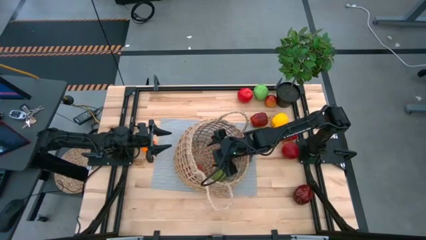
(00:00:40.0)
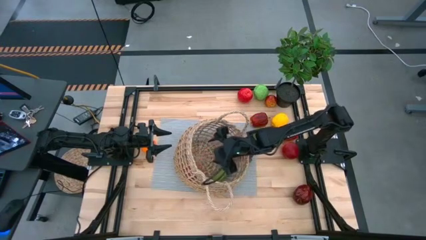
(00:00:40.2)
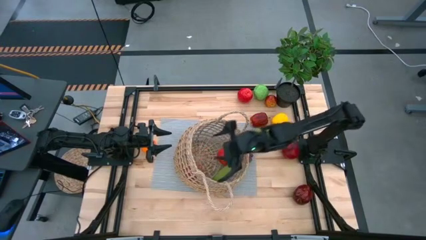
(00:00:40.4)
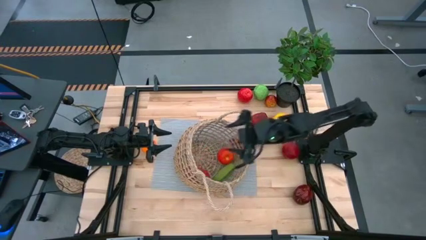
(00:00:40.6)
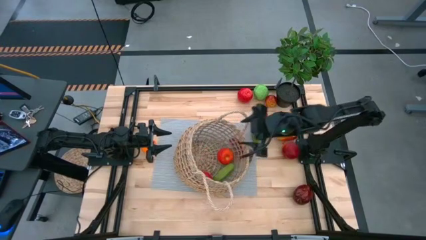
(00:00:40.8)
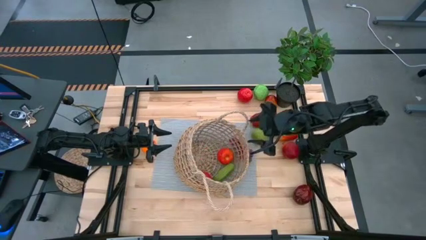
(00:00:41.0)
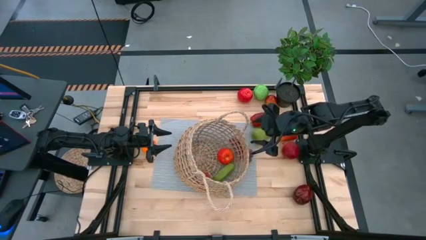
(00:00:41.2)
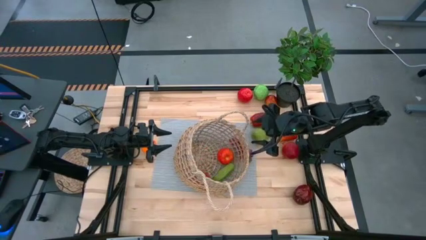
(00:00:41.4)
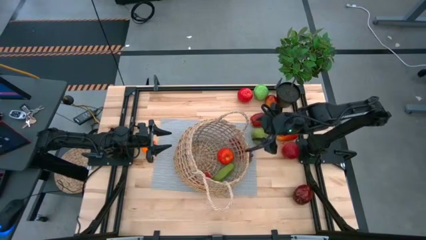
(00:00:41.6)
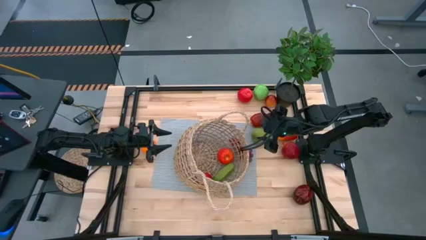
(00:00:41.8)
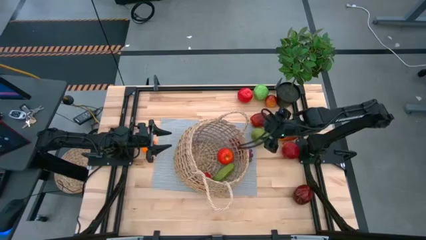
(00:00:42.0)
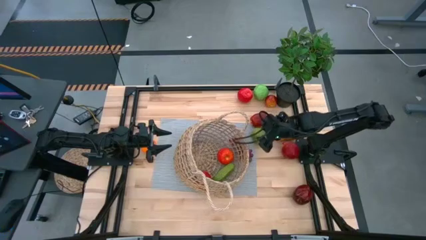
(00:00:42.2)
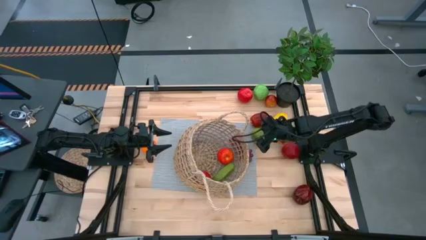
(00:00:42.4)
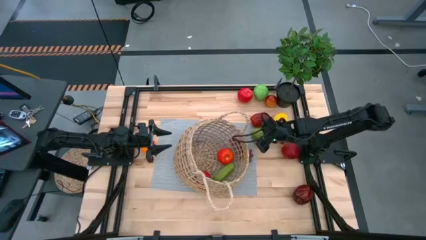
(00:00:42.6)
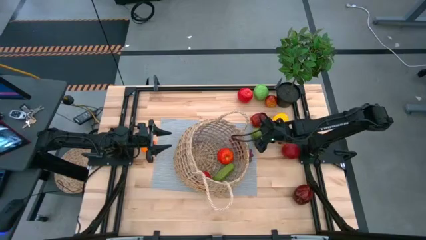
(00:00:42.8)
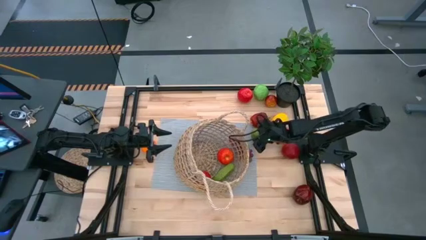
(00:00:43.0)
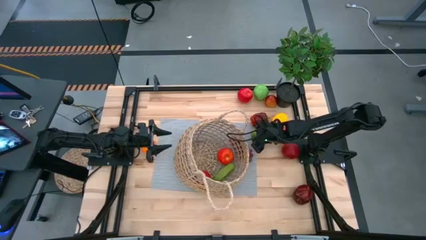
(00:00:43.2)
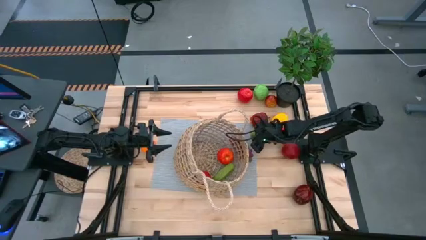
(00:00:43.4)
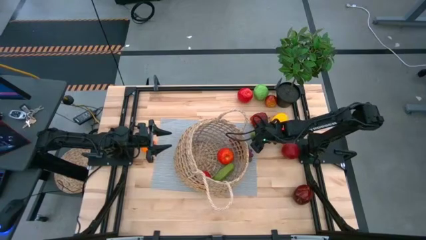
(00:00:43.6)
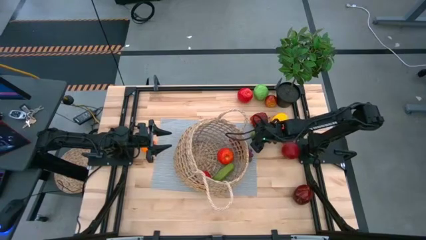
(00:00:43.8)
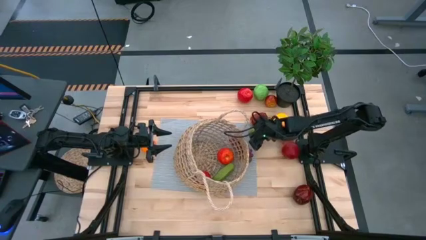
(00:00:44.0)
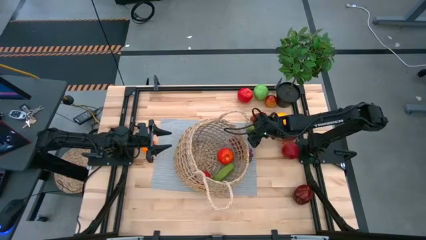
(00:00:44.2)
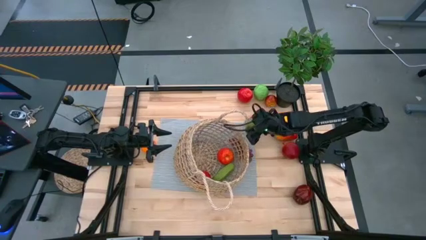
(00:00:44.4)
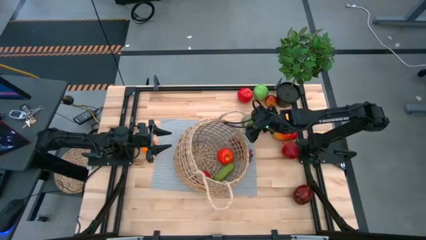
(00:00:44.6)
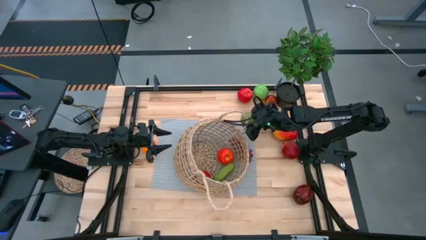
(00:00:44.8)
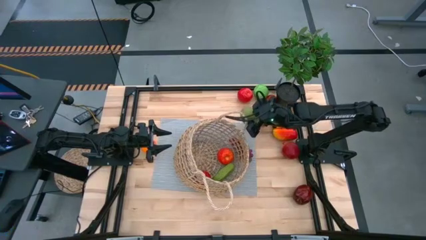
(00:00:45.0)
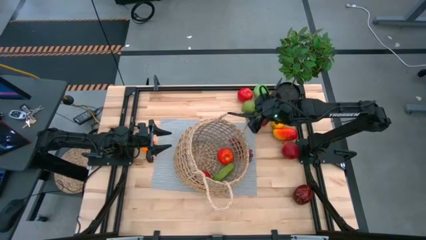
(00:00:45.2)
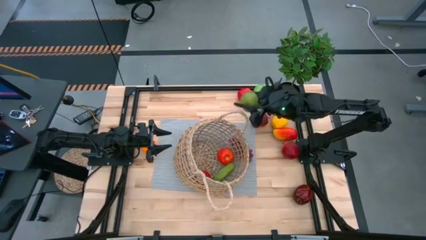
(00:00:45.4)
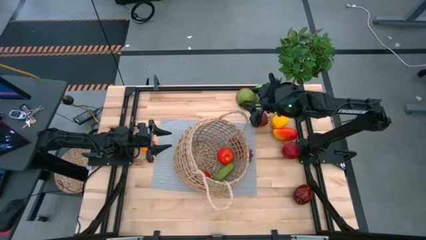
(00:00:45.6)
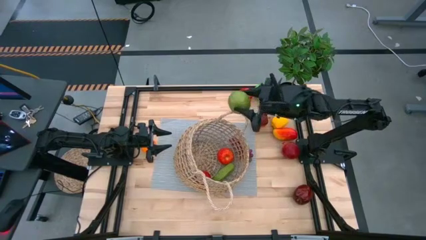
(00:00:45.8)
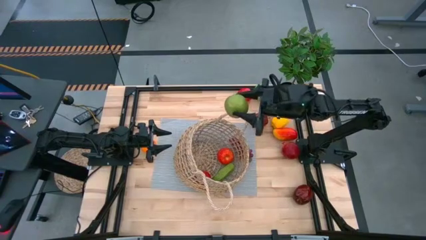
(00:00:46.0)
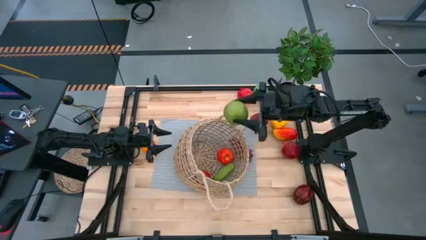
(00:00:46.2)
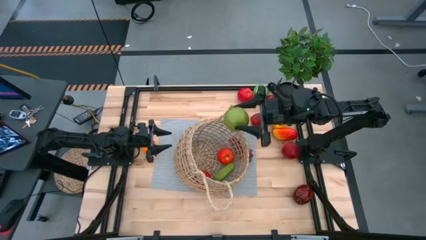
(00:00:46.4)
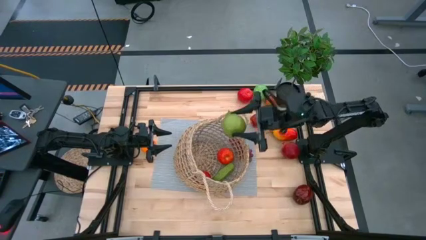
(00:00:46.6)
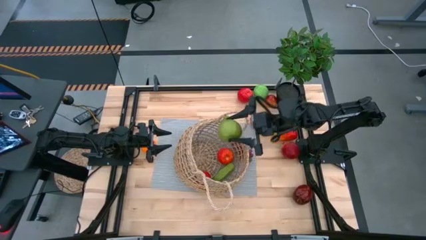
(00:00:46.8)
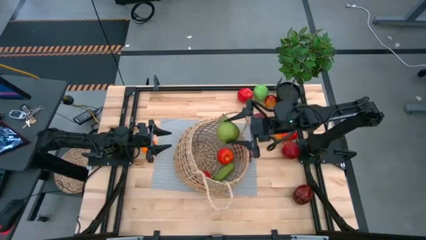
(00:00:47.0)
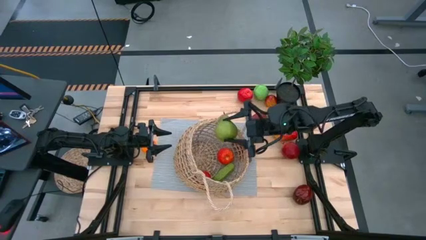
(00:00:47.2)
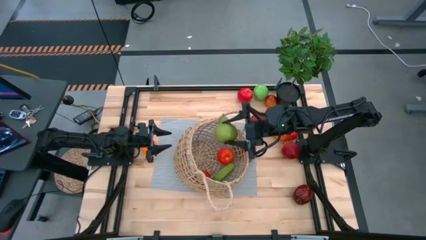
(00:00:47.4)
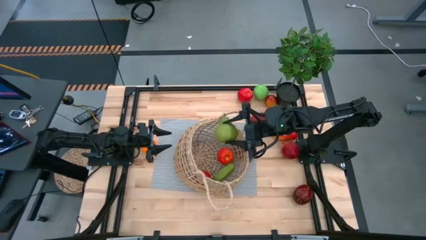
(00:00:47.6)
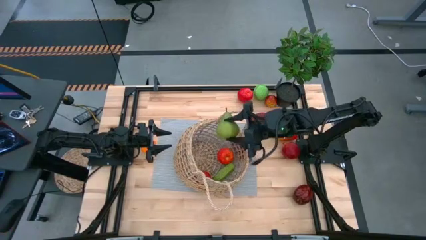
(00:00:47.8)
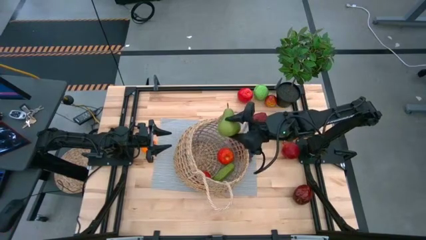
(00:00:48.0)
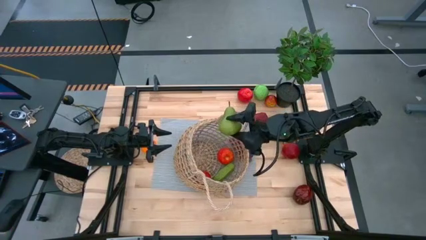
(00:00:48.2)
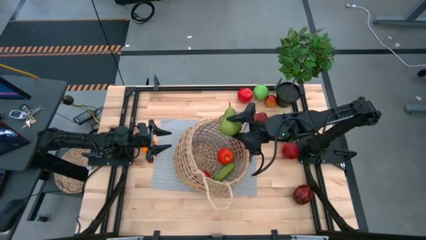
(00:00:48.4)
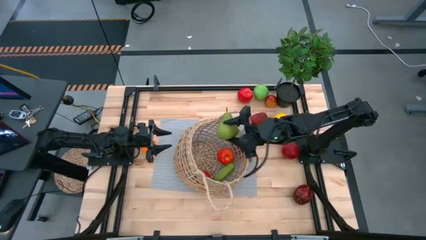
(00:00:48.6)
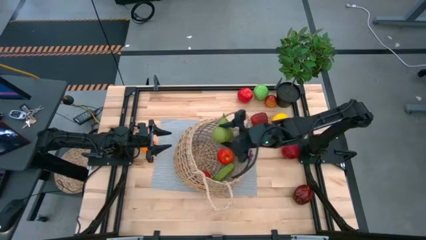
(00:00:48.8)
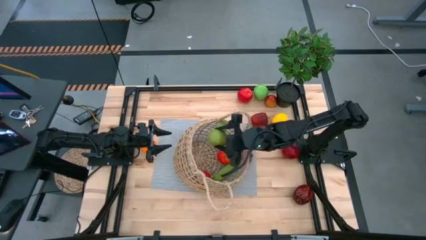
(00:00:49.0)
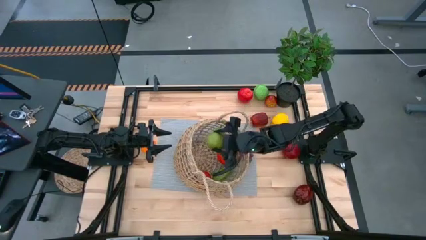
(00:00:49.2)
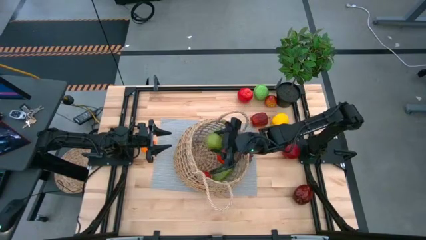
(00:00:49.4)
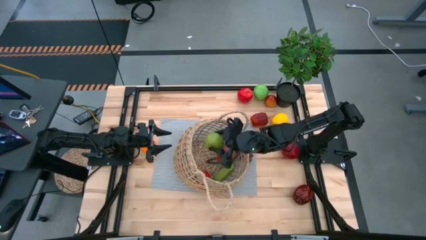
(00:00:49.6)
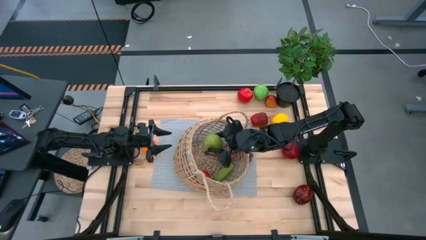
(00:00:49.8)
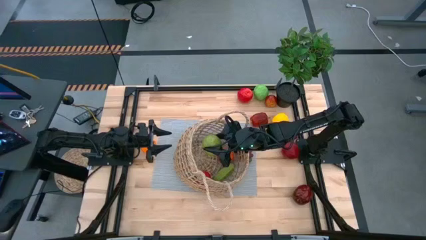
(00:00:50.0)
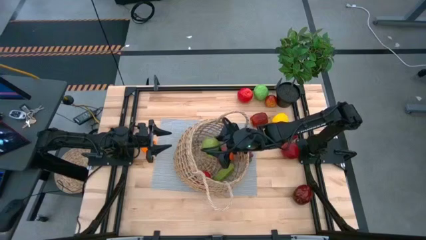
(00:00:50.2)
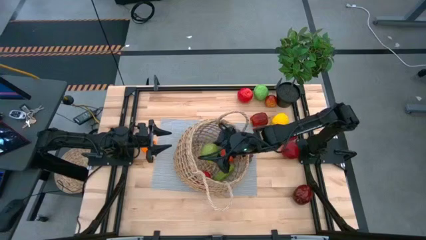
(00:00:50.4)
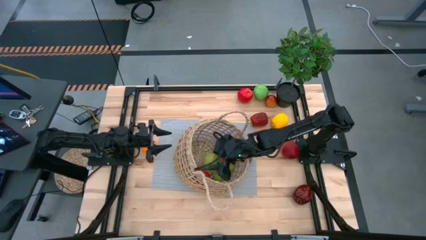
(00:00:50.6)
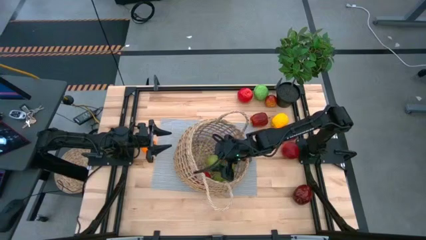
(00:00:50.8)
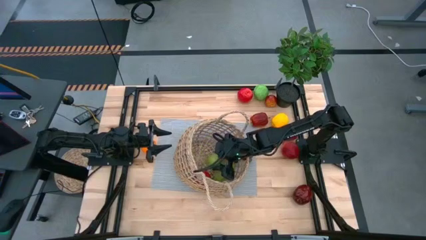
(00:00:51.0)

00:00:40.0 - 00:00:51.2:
Task: Build produce basket
Put the pear into the basket

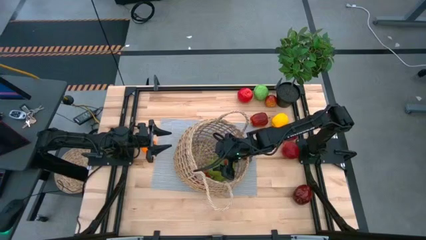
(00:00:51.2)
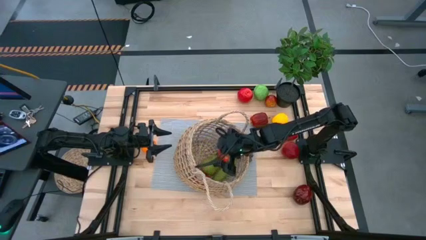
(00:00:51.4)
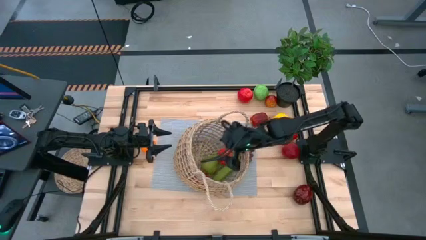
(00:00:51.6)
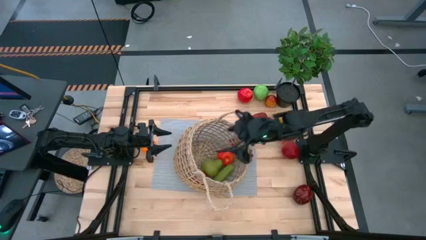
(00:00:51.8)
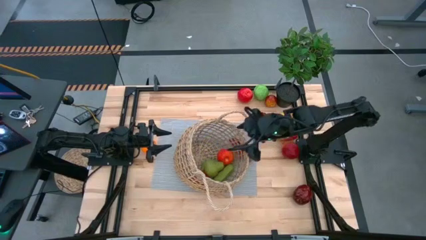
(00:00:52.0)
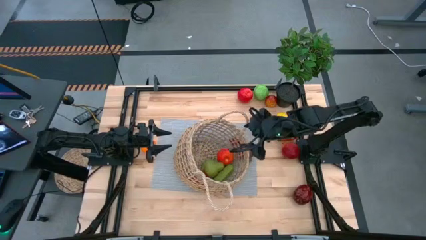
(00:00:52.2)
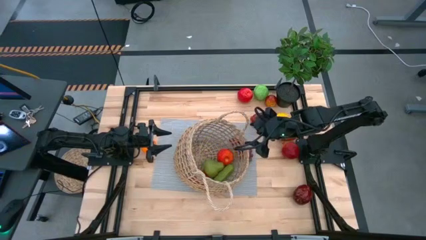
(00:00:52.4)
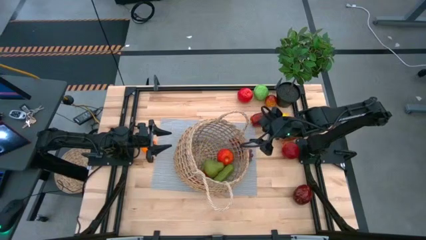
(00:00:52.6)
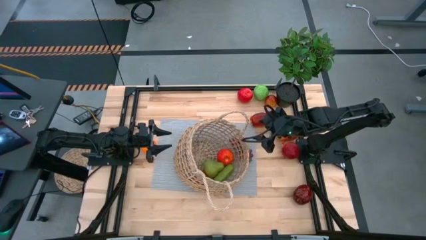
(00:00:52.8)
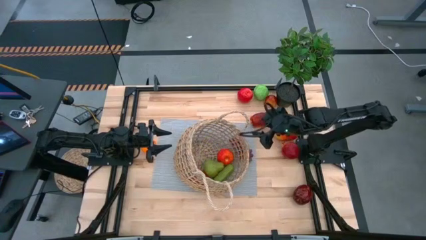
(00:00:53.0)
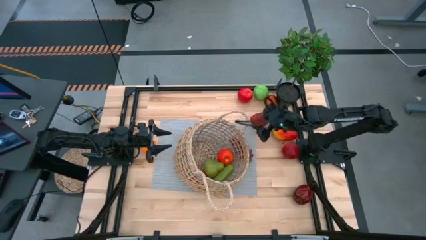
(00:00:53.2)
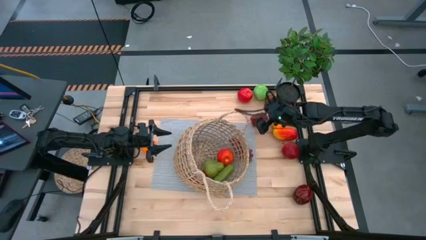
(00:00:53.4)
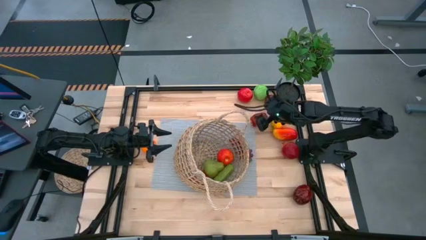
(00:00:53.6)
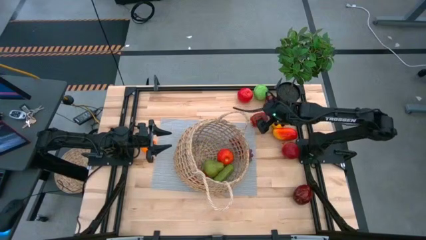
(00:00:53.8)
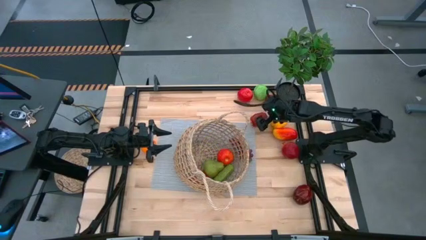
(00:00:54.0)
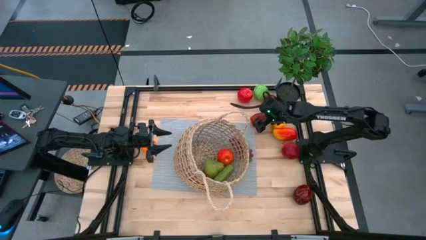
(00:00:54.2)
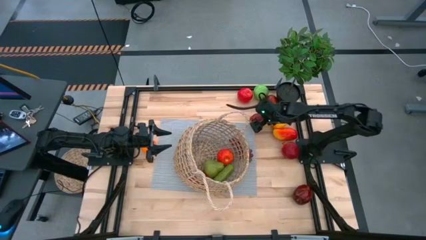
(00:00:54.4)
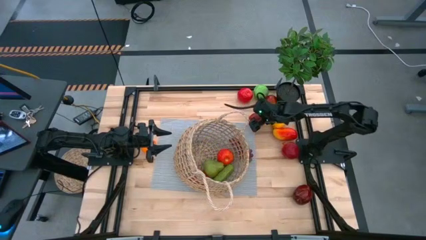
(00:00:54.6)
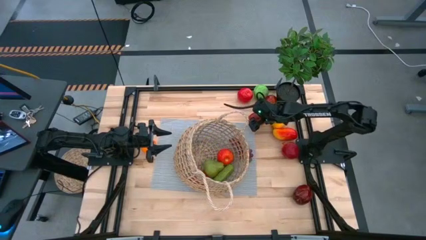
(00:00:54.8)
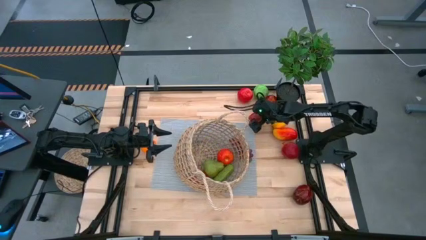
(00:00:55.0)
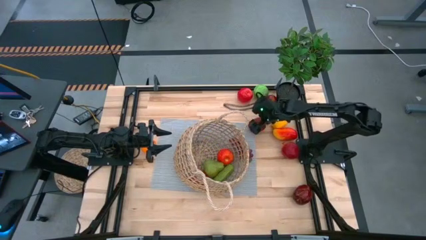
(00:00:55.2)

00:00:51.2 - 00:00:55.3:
Put the apple into the basket

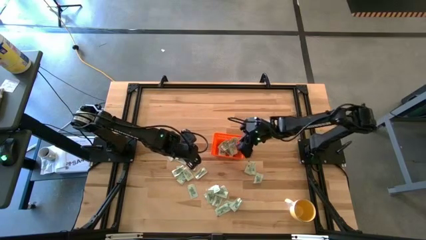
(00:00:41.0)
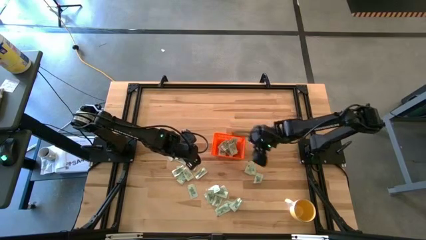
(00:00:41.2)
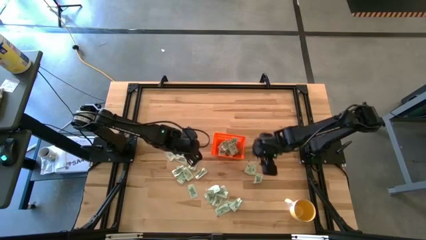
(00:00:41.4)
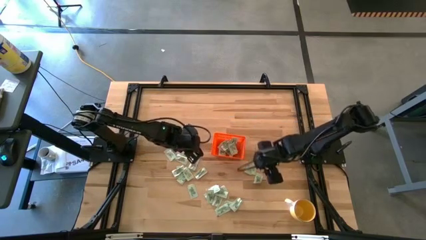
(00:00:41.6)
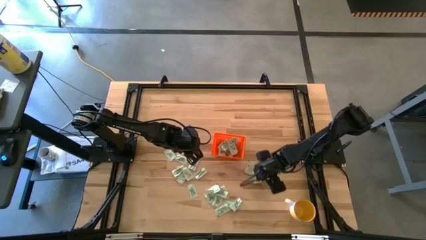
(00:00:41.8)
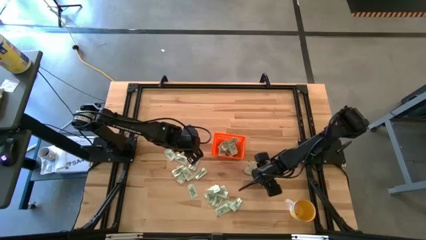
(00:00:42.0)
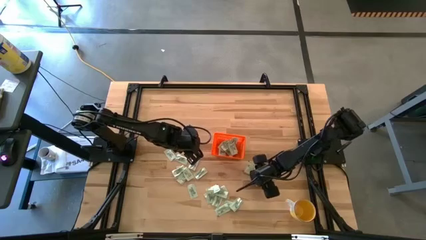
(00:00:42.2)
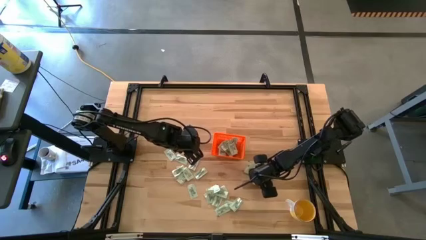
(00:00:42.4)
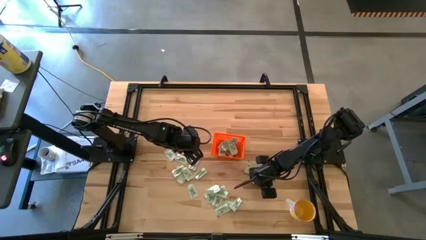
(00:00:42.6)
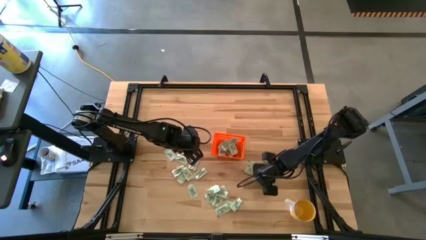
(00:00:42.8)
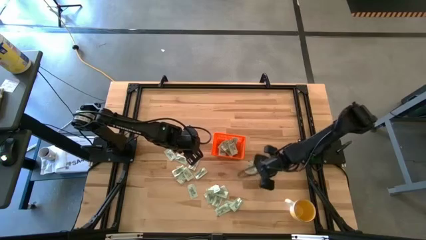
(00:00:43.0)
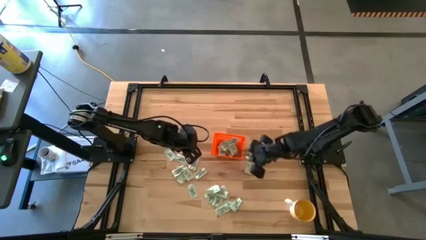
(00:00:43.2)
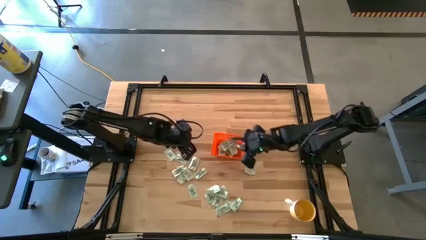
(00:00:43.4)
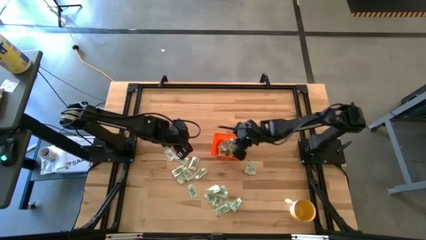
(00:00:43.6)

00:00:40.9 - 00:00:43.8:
Task: Pick and place Stevia / Truvia into bins
Put the white stevia packet into the orange bin
